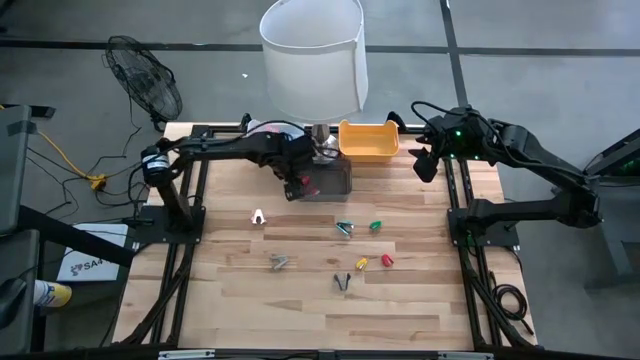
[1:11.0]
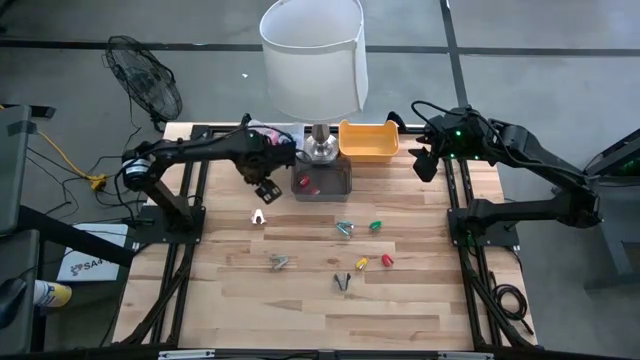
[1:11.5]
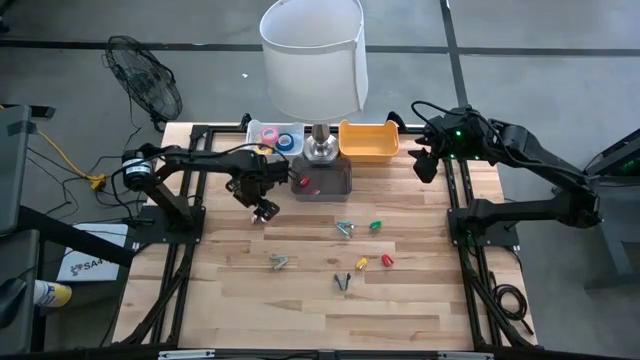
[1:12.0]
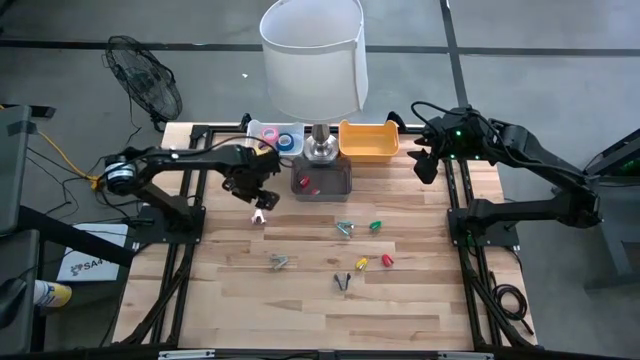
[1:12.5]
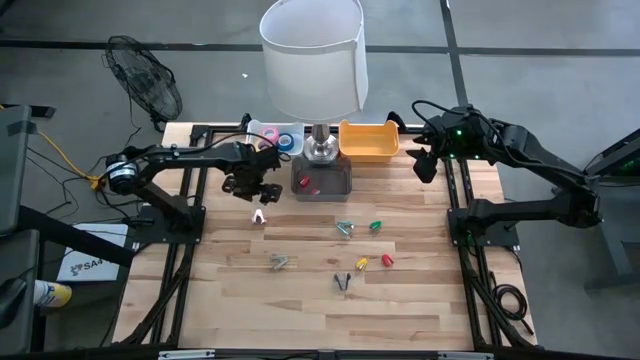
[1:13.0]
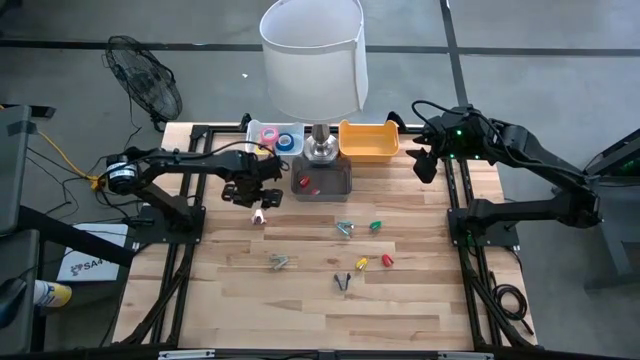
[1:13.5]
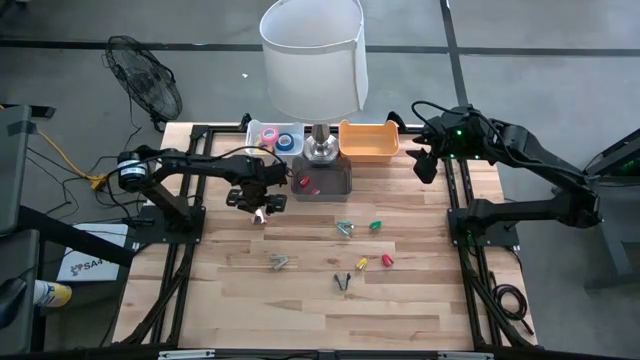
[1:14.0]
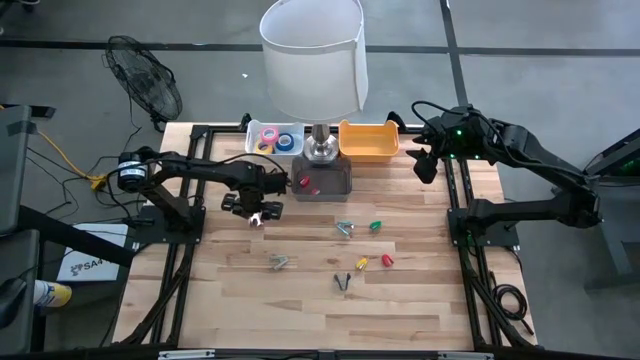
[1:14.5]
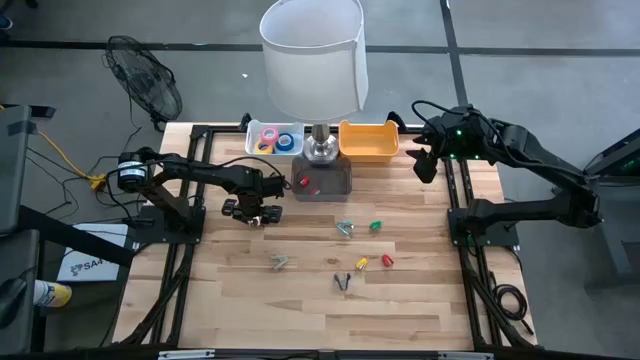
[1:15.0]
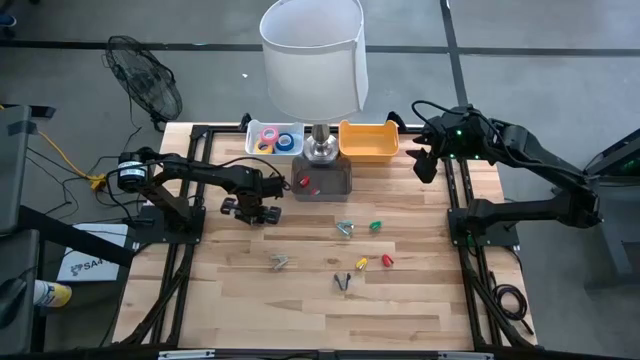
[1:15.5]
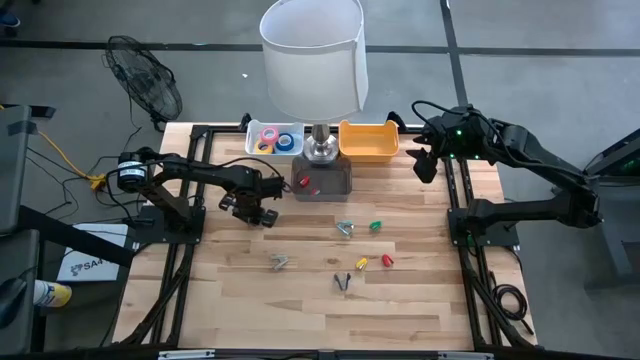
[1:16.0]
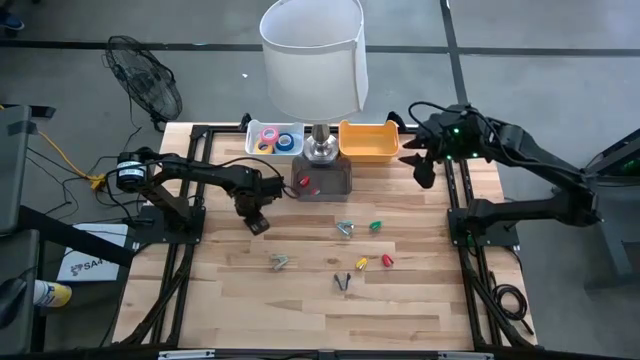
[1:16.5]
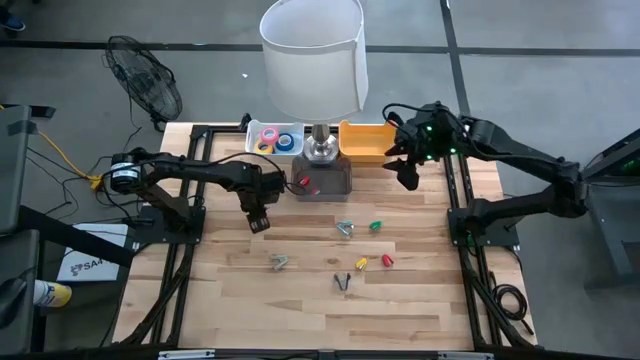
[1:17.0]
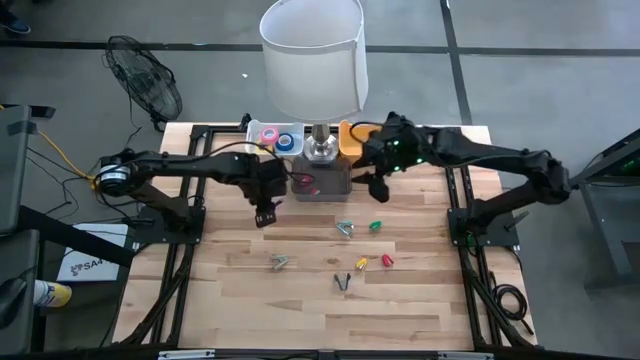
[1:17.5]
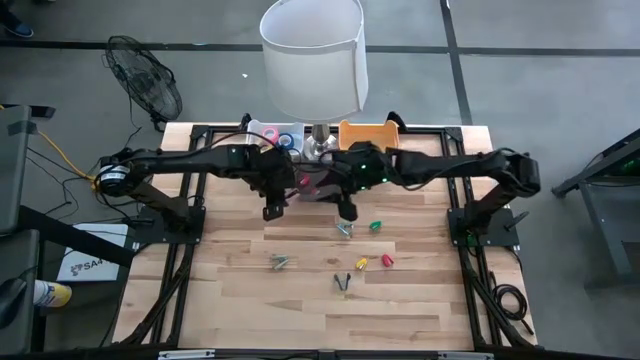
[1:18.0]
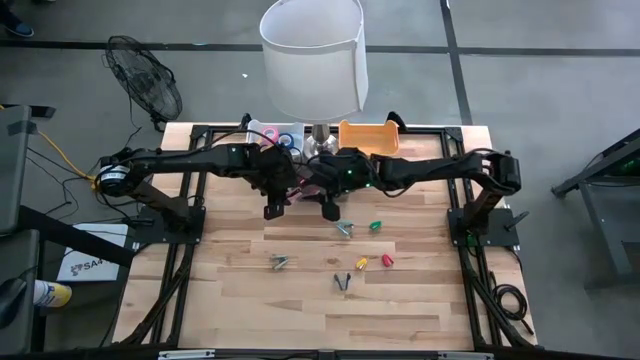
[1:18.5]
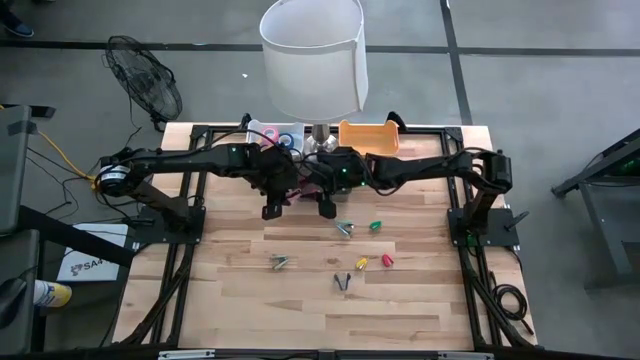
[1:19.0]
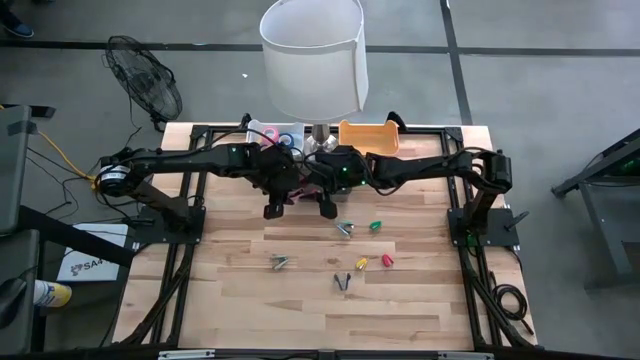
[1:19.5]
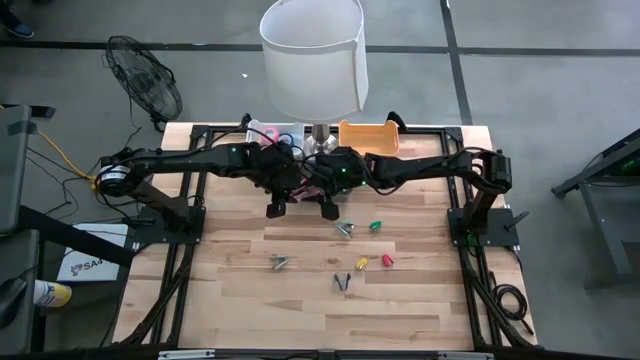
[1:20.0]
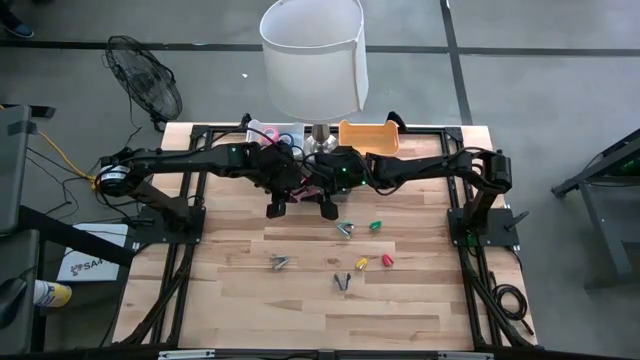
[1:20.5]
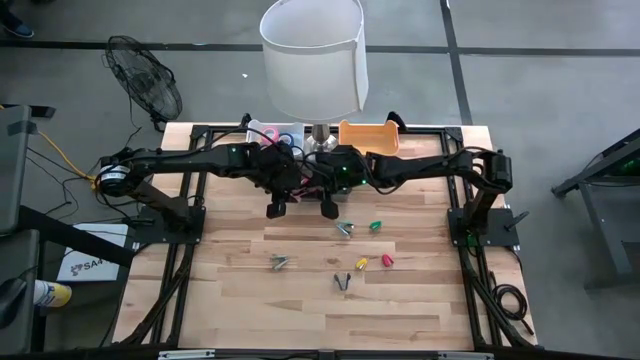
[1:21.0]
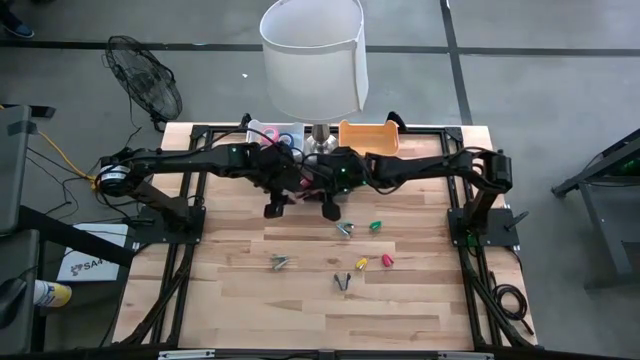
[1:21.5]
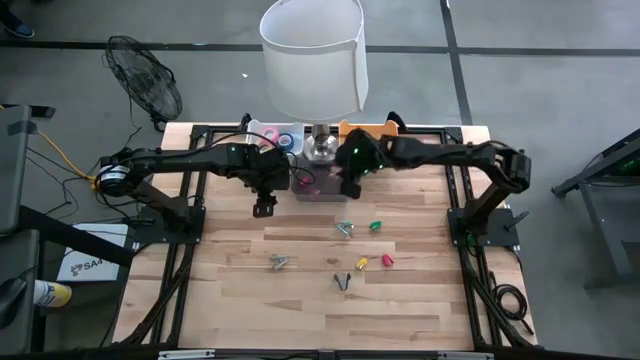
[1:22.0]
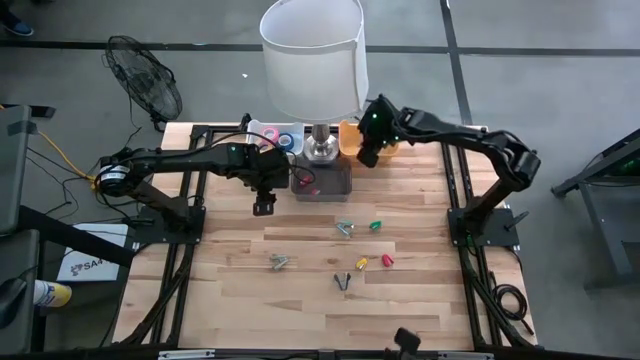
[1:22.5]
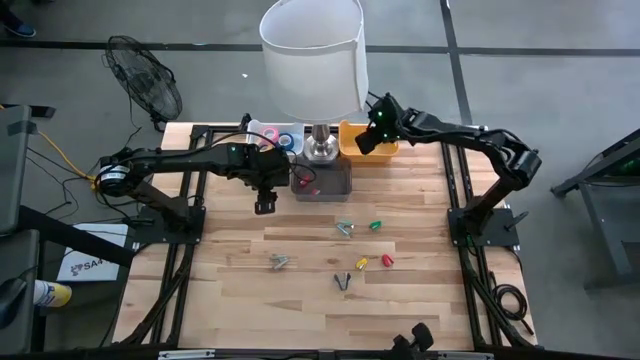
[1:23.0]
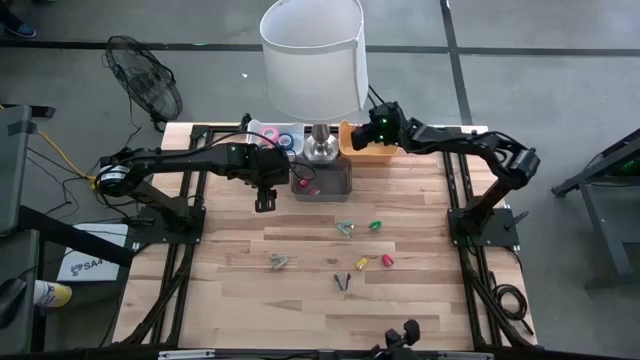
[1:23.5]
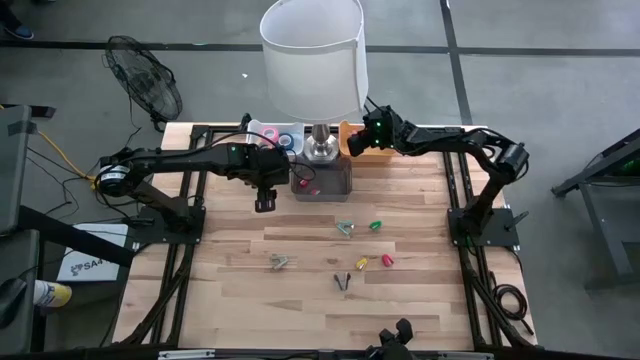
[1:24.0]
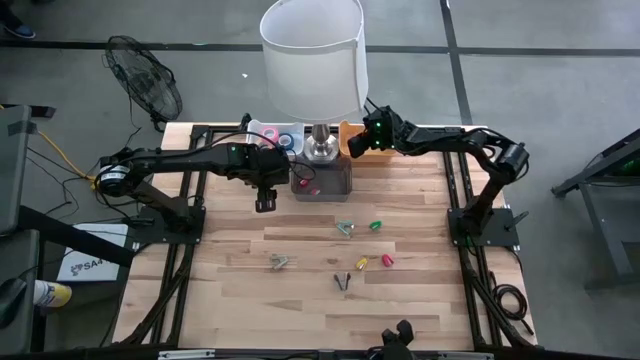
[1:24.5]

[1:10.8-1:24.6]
Task: Pick and place Stapler, Stapler remover, tape
Put the pink staple remover into the yellow bin

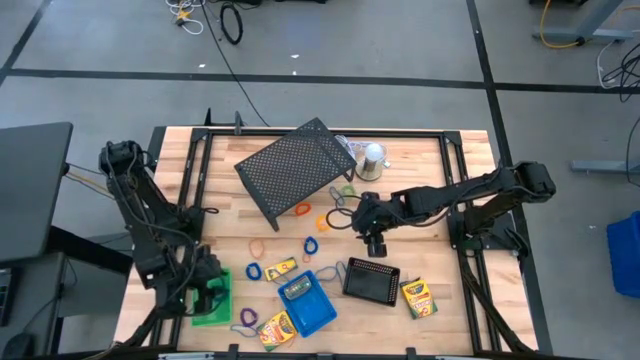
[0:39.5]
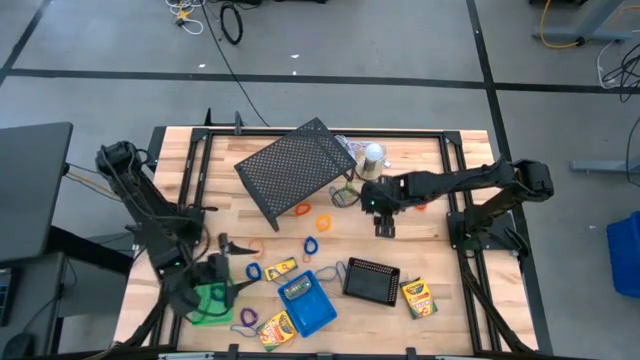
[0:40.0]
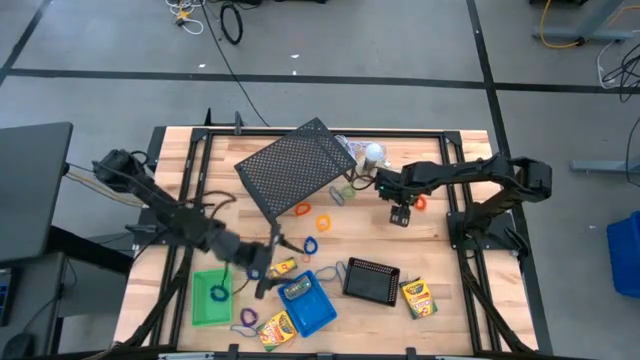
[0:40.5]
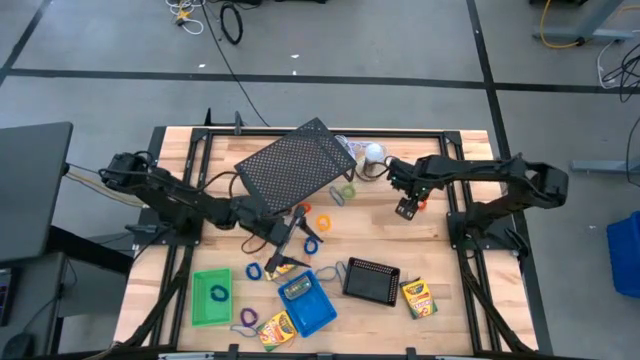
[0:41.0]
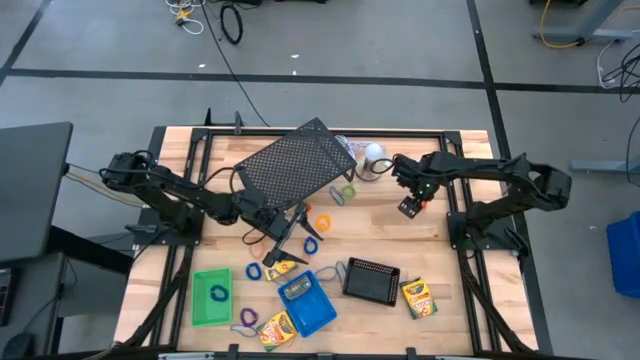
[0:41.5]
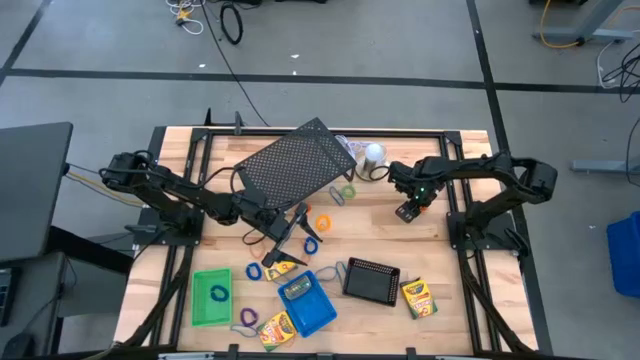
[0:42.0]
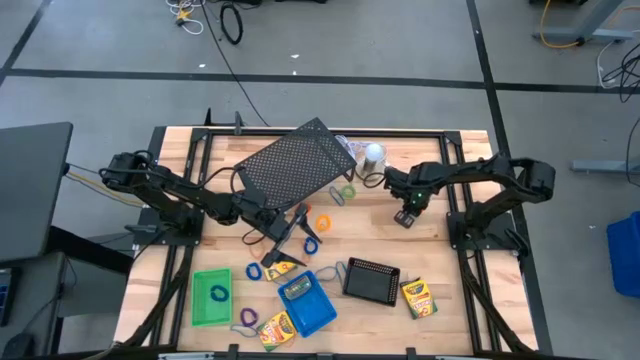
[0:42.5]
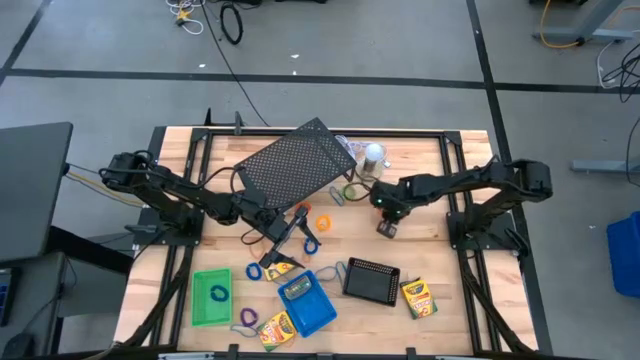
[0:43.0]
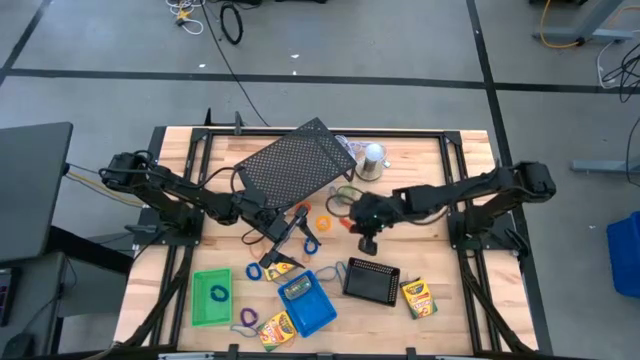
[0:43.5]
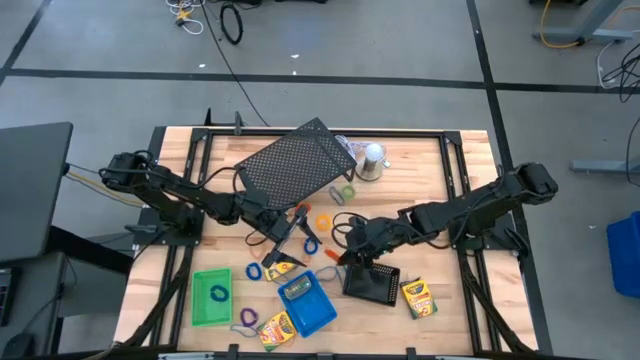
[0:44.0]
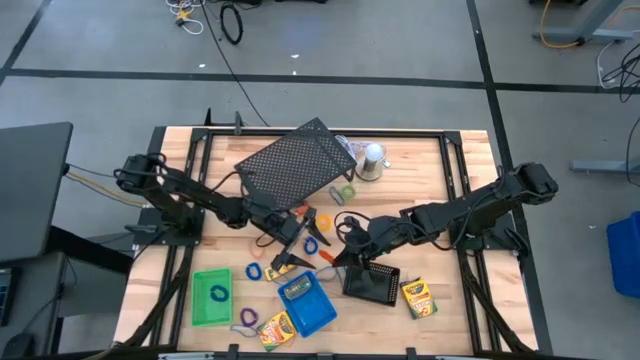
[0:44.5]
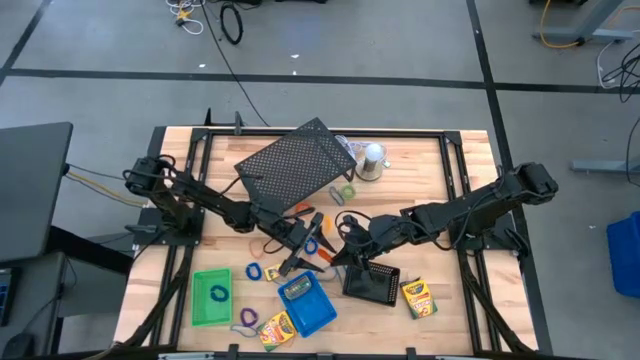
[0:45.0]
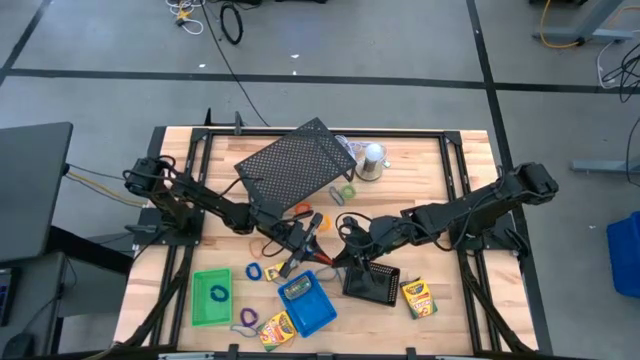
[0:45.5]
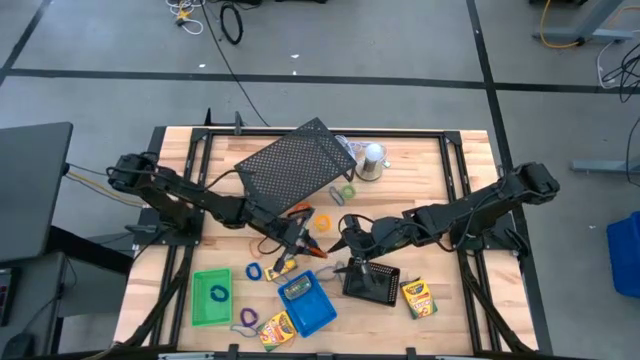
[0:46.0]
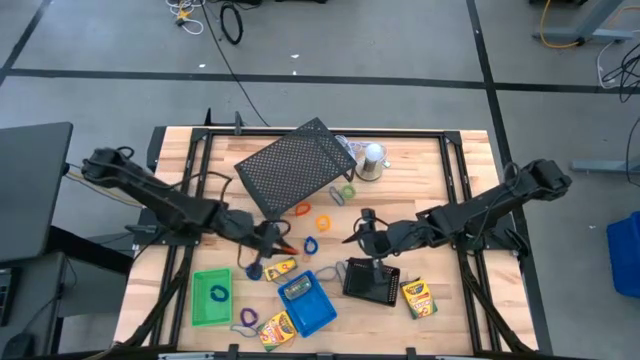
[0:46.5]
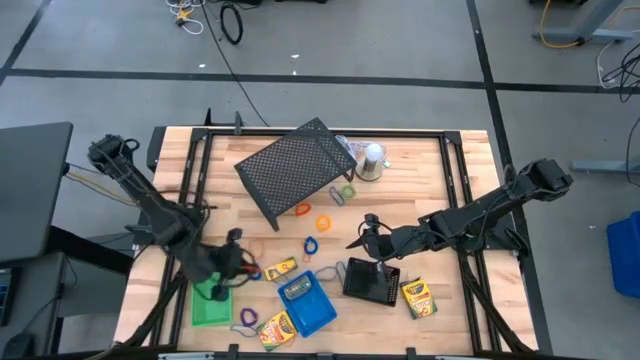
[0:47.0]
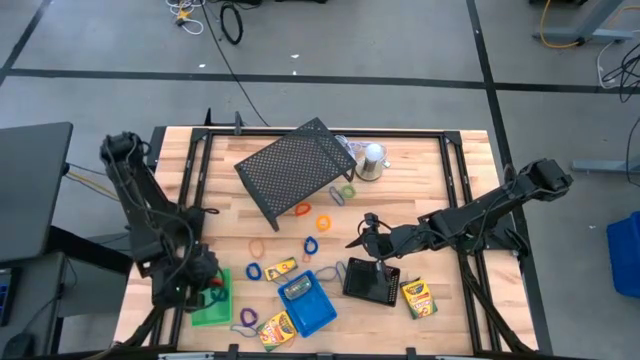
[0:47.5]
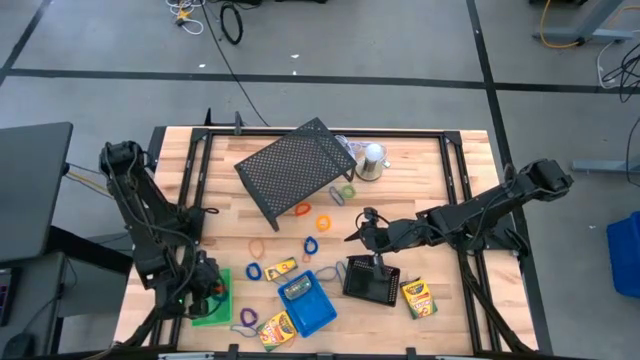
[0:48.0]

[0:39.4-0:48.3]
Task: Pick & Place Office Desk Supplies
Put the orange spiral keychain into the green bin
